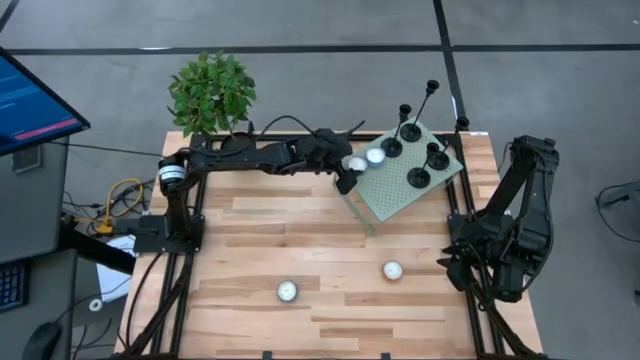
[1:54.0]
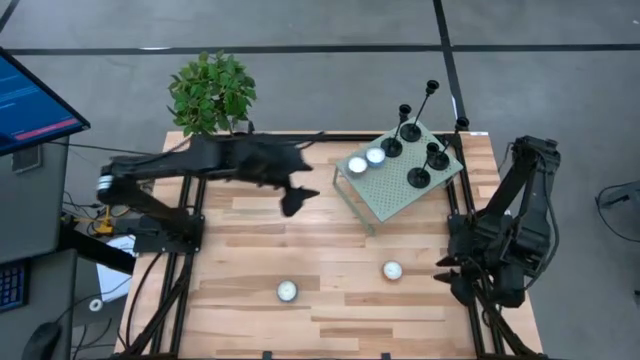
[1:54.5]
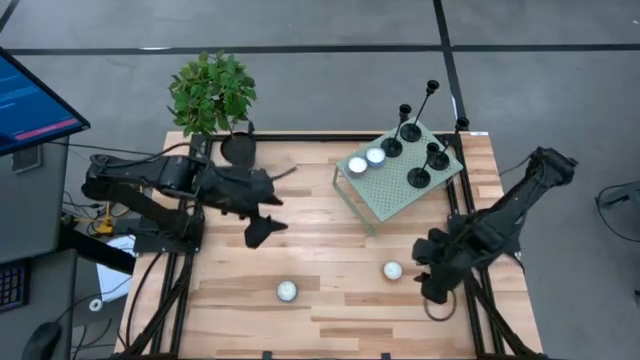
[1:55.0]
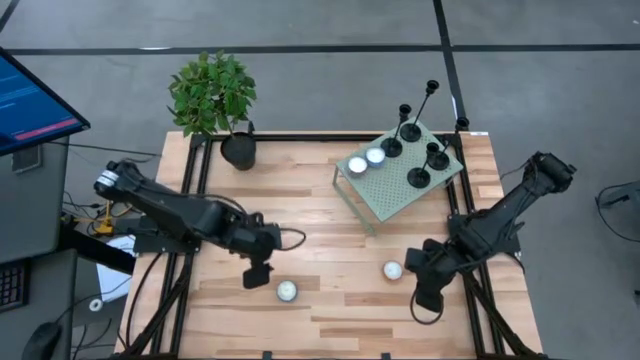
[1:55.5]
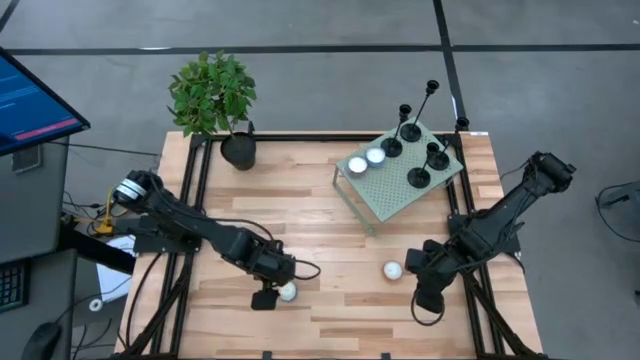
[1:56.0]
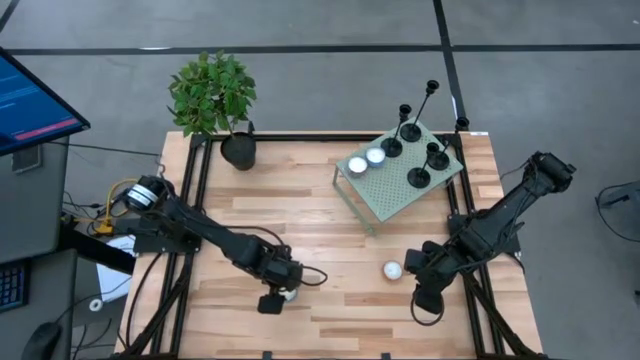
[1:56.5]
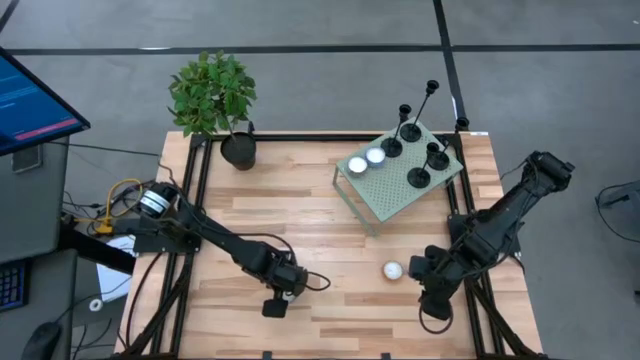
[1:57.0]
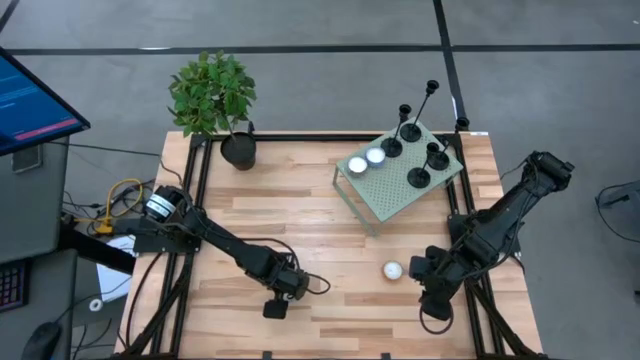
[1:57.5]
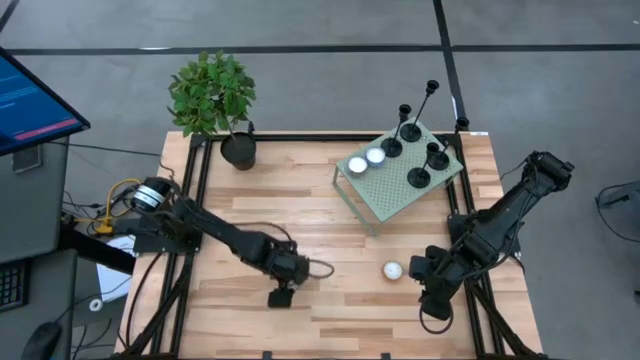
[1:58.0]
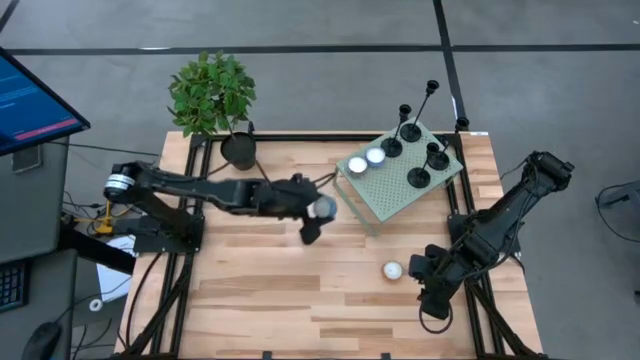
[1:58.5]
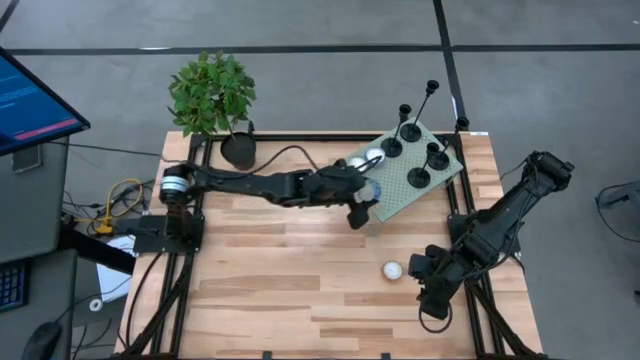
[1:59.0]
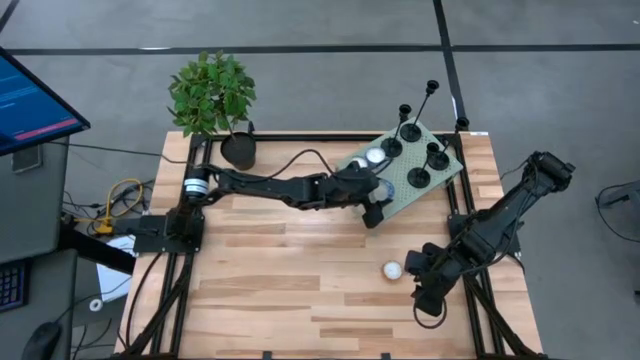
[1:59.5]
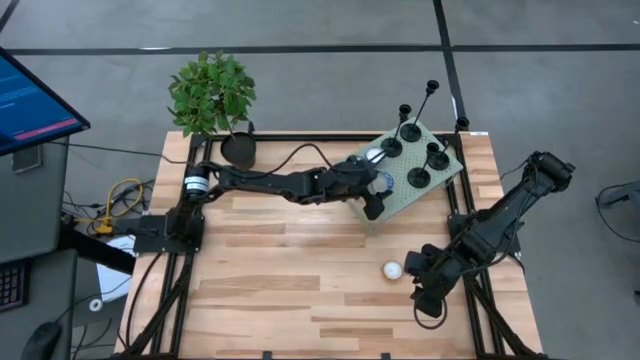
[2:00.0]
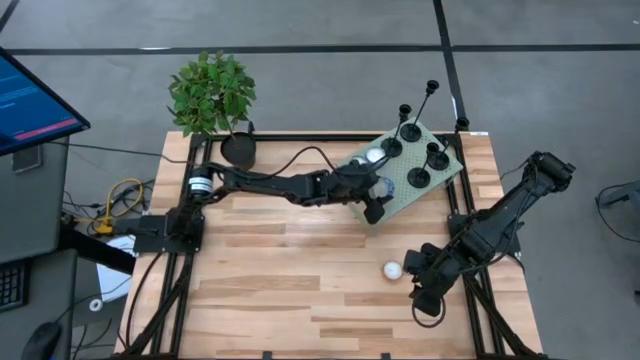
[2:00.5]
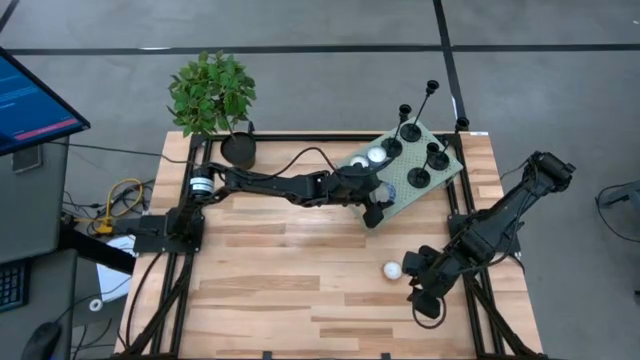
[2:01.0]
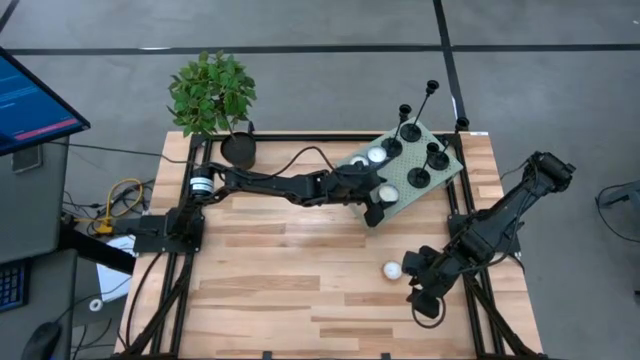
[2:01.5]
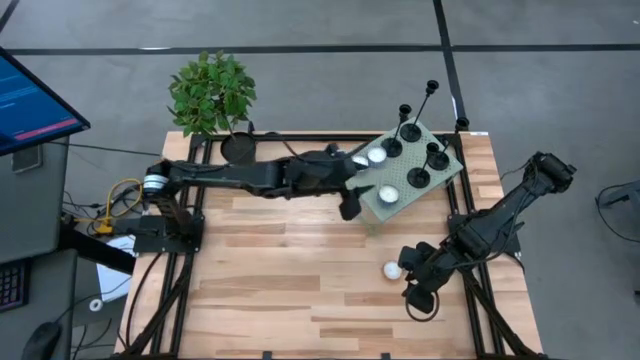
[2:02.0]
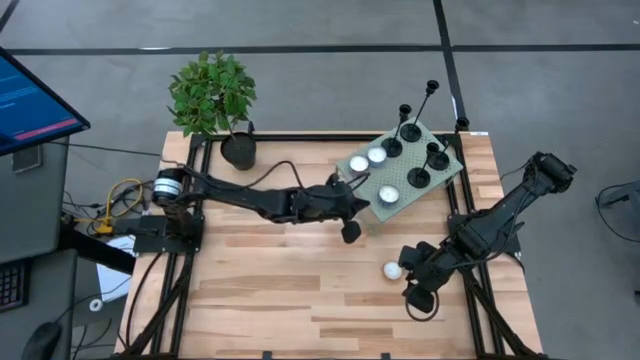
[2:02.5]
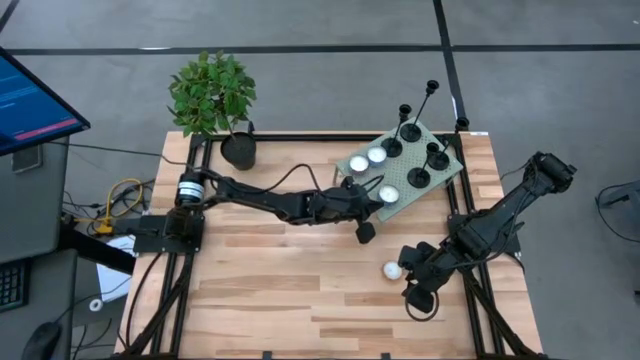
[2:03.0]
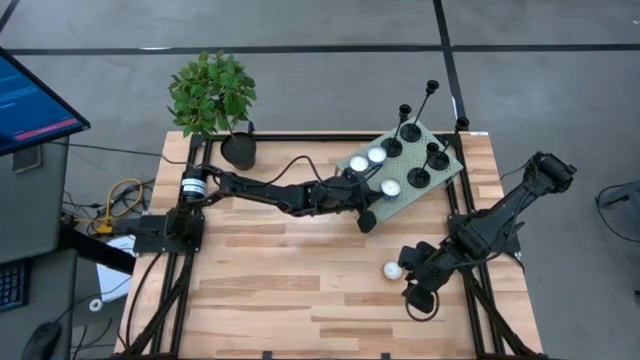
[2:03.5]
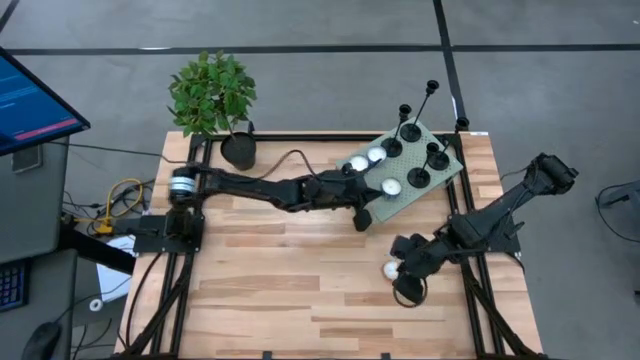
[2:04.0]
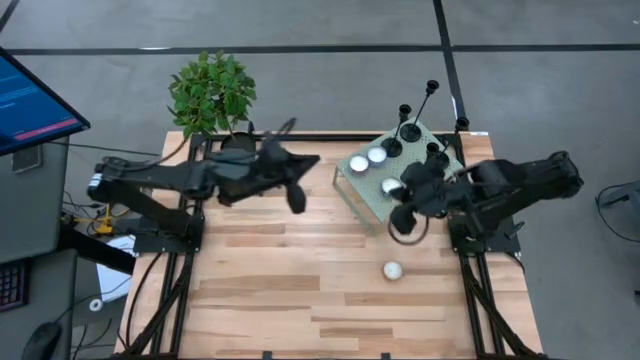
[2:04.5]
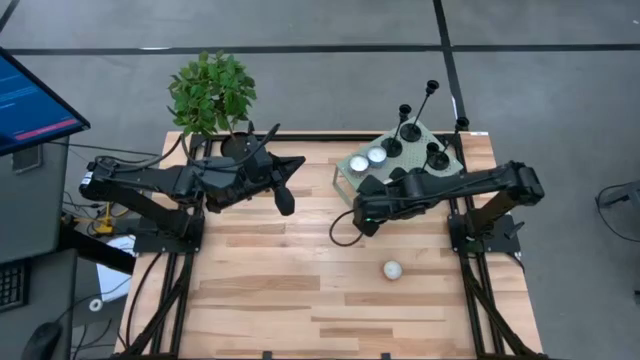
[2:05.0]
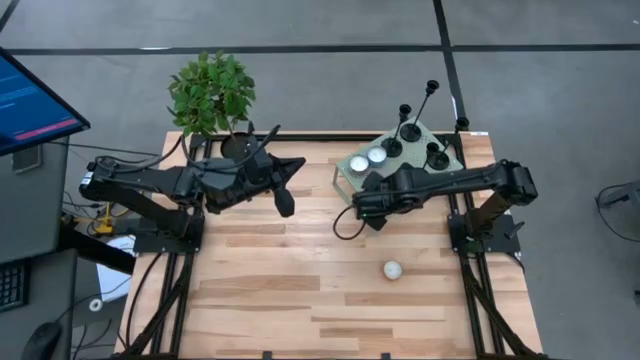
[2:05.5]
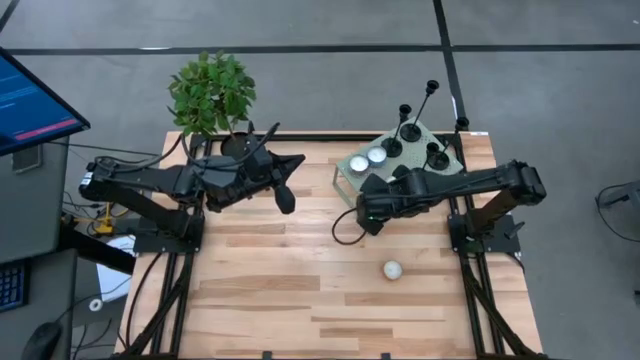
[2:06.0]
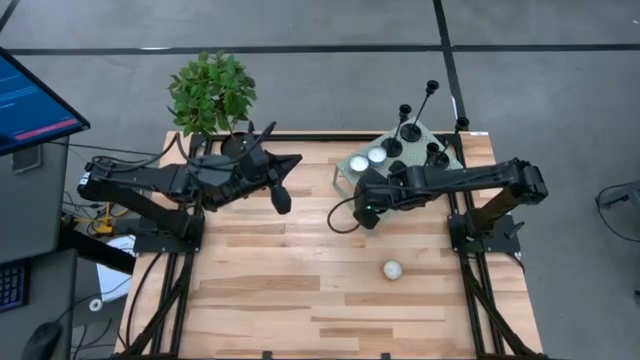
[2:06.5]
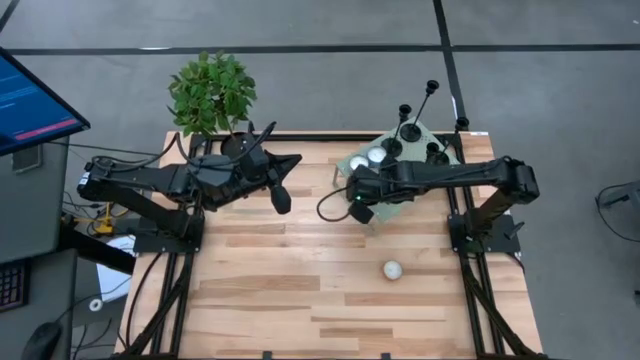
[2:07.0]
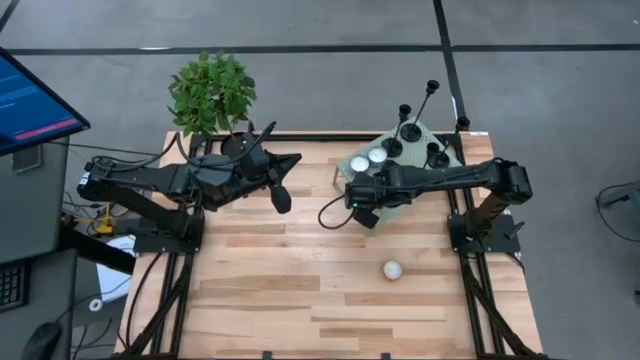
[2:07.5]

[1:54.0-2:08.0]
Task: Pick & Place candle stick holders
Put the blue scented candle on the shelf

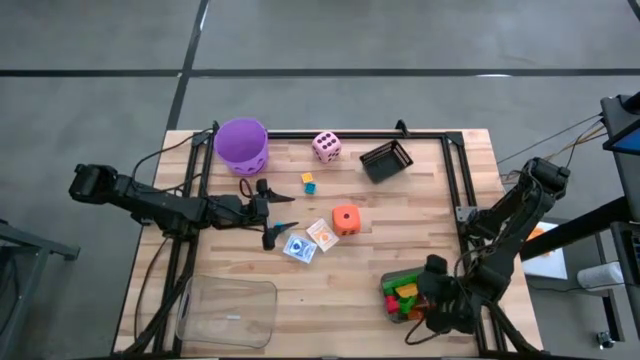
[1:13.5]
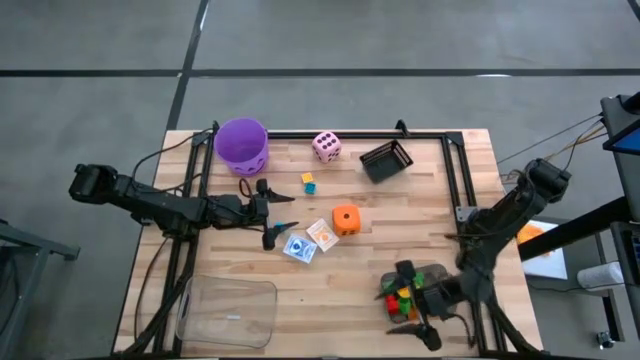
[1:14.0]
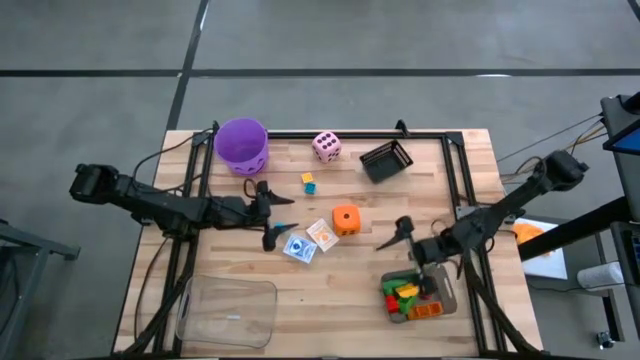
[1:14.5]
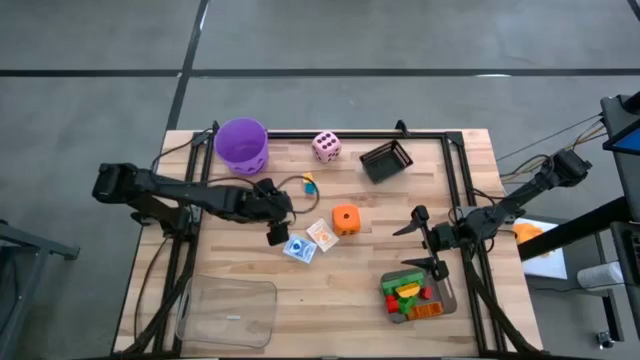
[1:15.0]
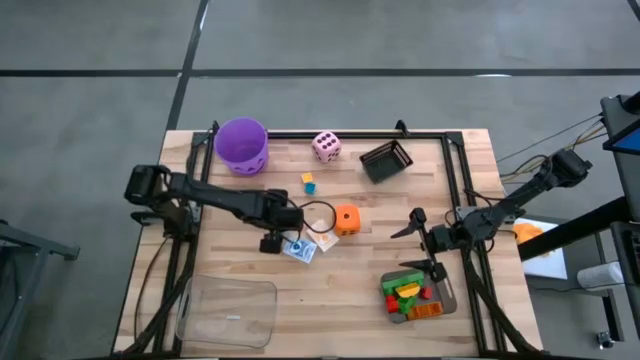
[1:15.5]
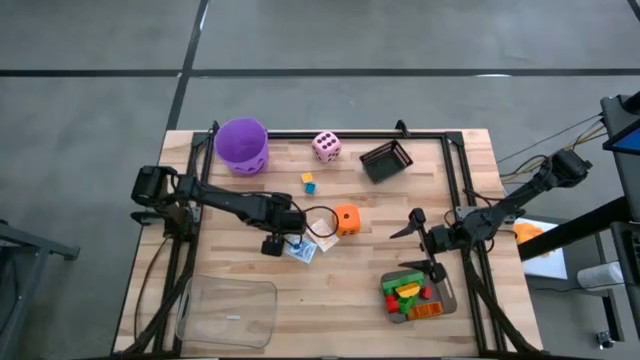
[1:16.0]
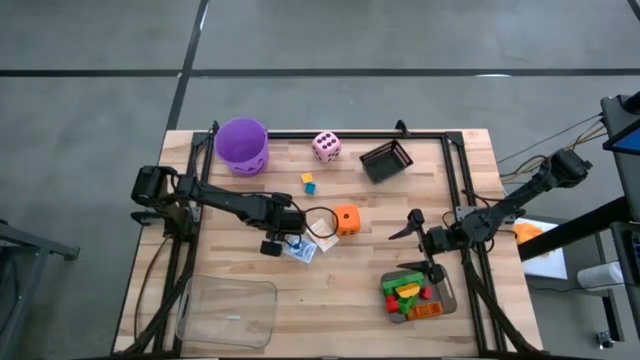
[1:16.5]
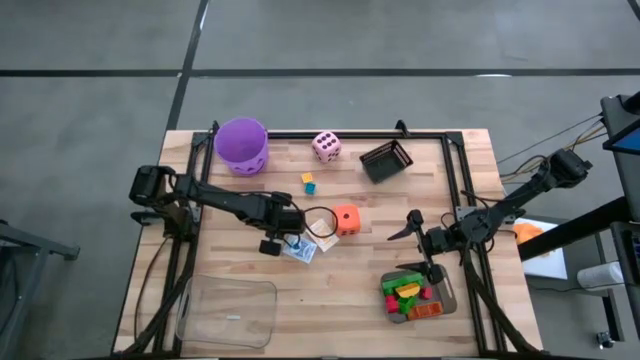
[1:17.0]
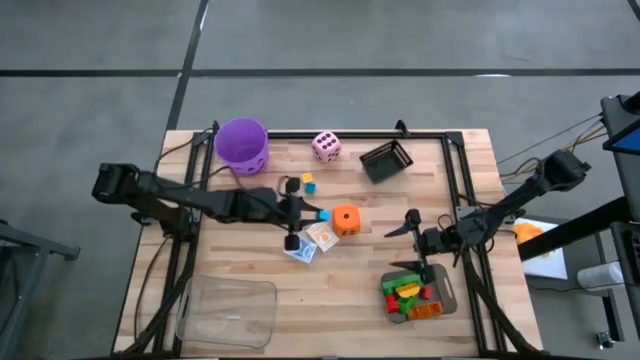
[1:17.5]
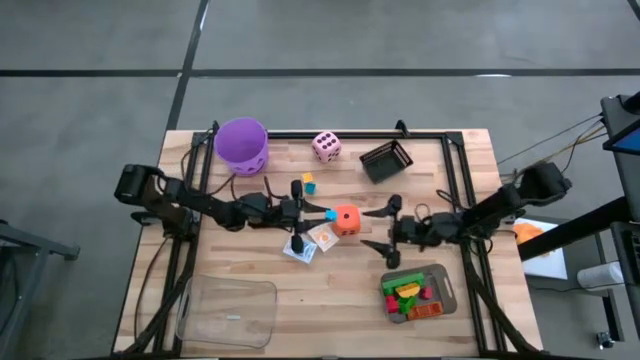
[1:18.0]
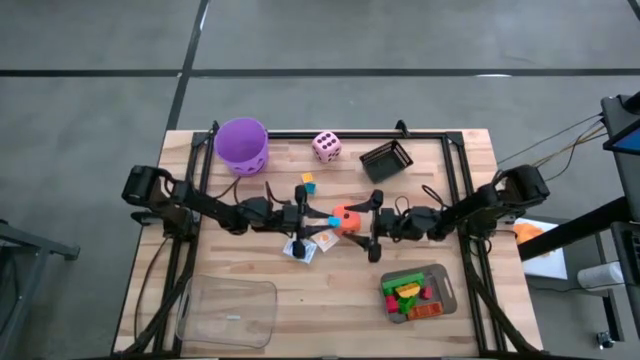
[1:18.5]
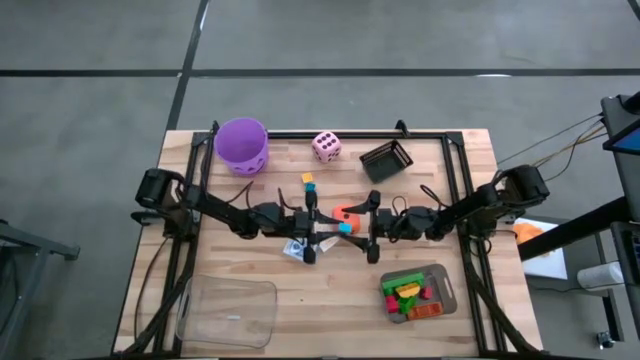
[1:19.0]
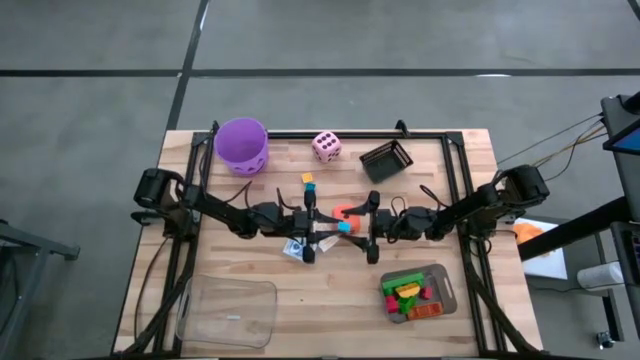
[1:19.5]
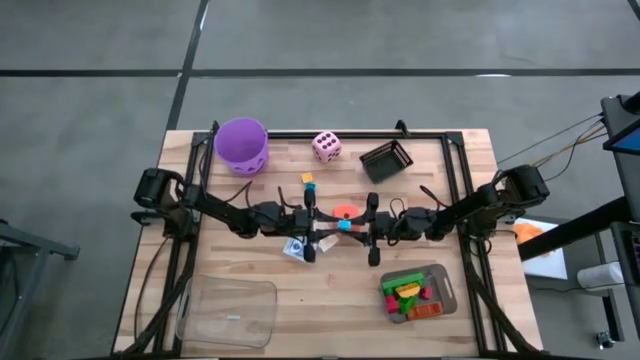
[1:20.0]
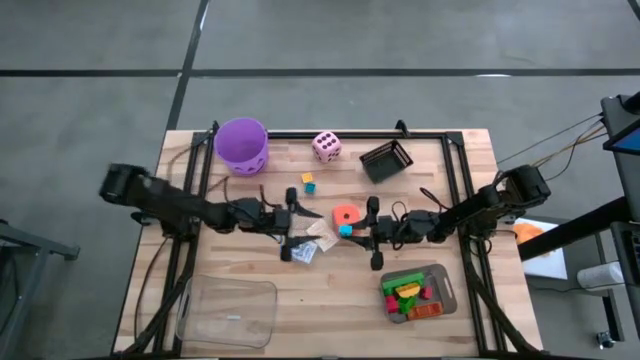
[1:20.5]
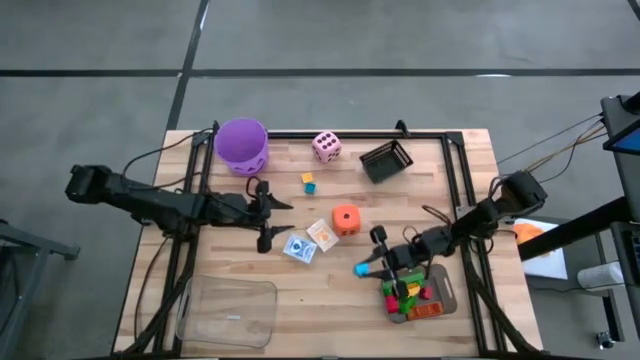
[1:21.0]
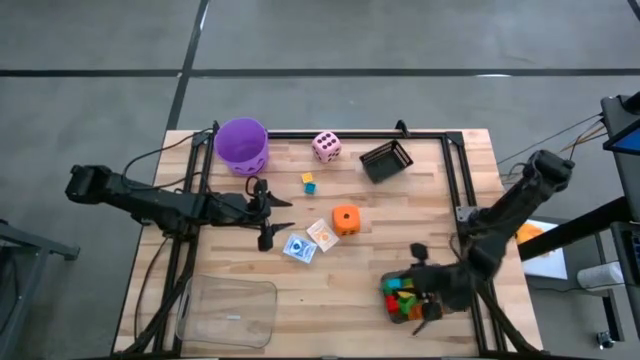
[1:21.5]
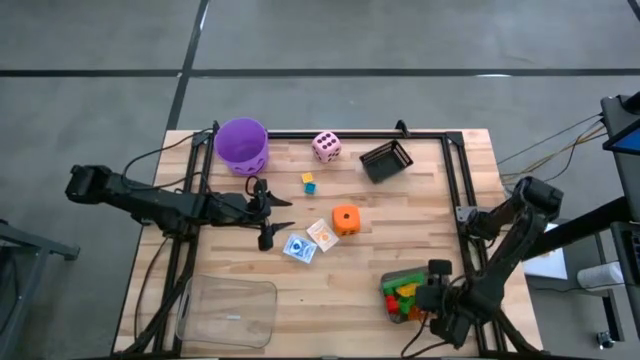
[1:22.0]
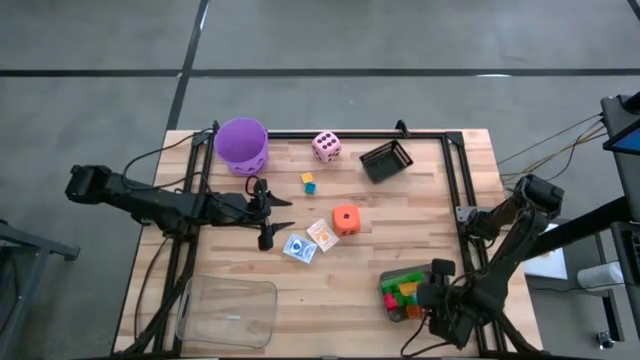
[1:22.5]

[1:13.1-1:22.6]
Task: Pick & Place Toys
Put the blue game piece into the black bin
